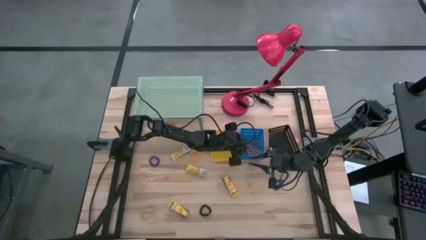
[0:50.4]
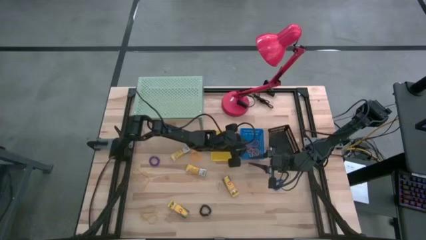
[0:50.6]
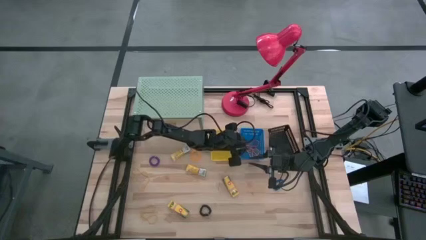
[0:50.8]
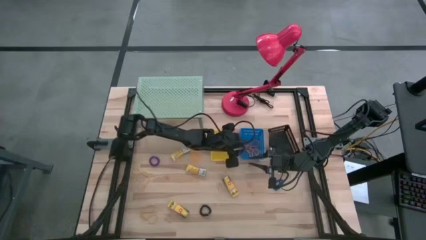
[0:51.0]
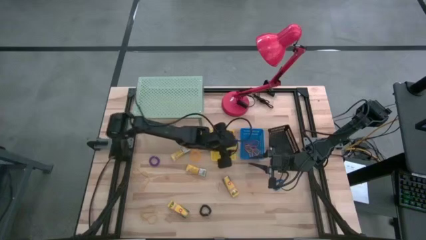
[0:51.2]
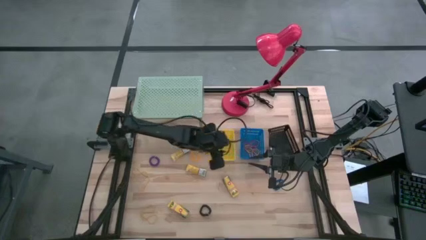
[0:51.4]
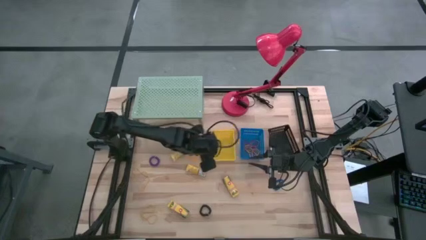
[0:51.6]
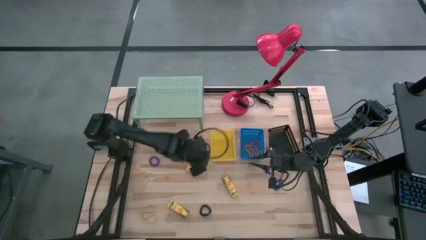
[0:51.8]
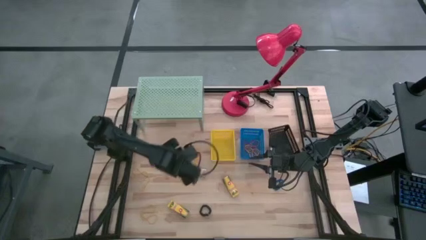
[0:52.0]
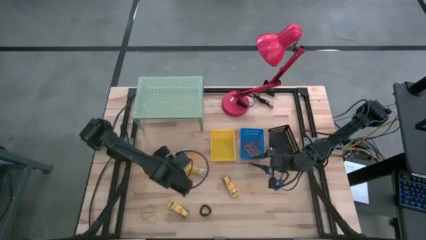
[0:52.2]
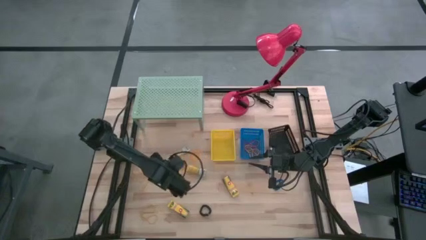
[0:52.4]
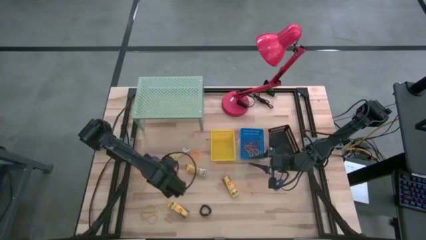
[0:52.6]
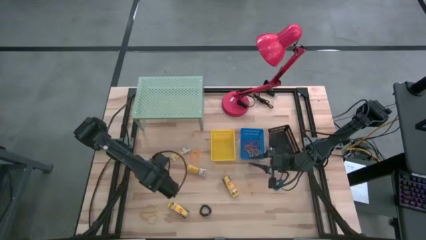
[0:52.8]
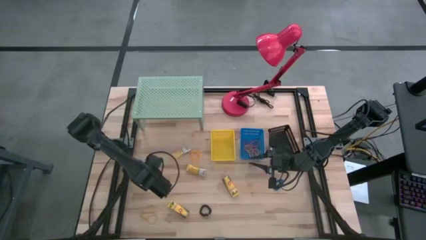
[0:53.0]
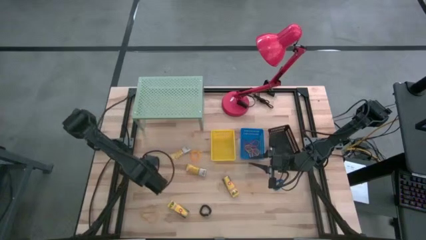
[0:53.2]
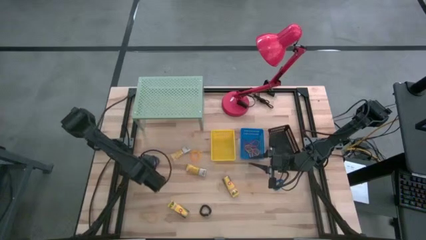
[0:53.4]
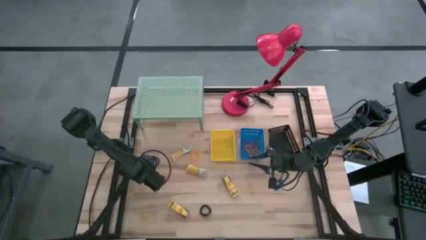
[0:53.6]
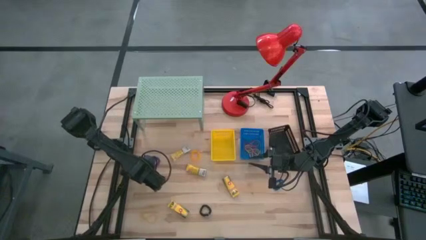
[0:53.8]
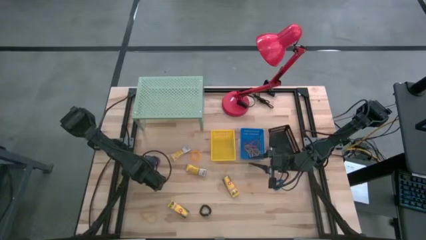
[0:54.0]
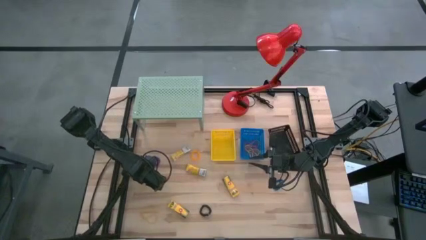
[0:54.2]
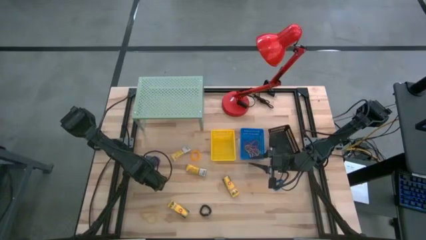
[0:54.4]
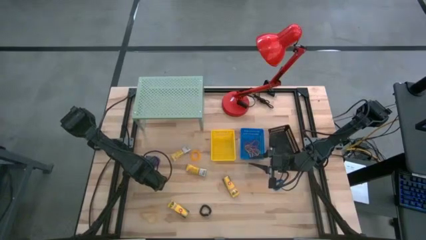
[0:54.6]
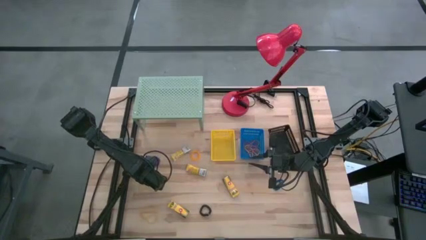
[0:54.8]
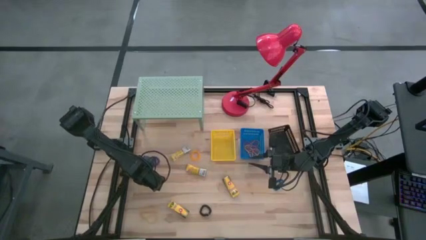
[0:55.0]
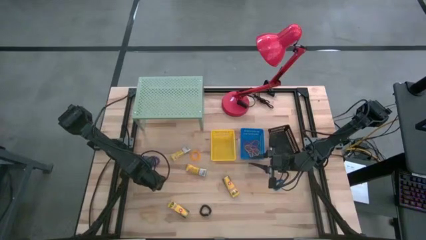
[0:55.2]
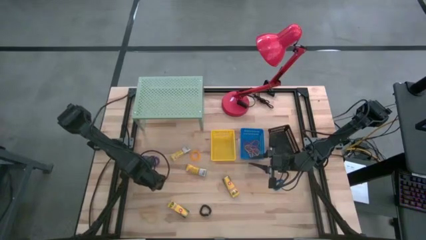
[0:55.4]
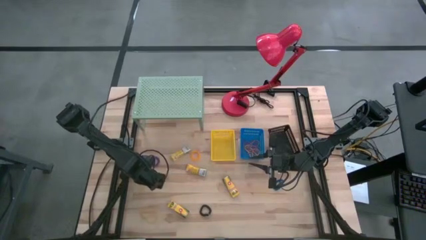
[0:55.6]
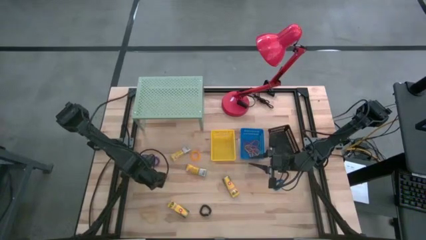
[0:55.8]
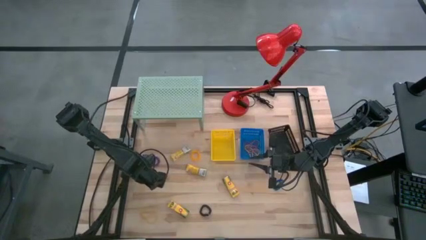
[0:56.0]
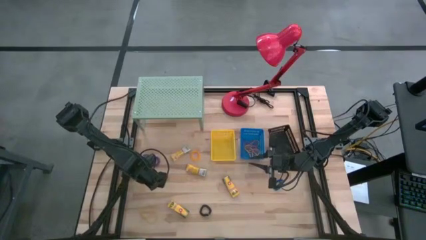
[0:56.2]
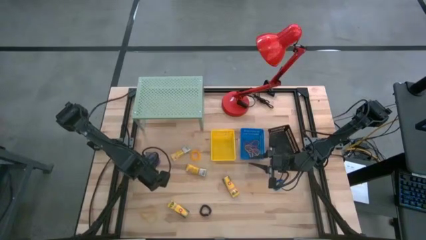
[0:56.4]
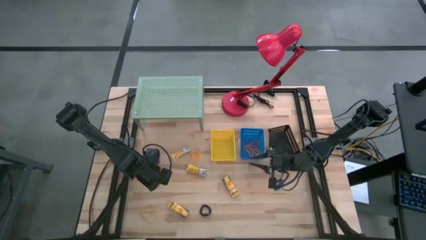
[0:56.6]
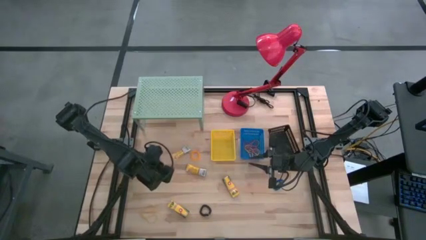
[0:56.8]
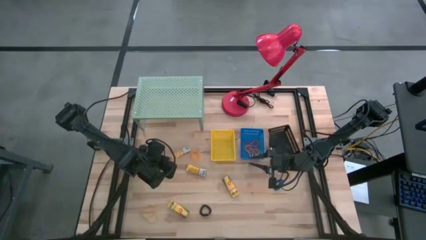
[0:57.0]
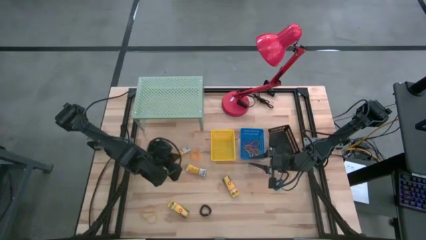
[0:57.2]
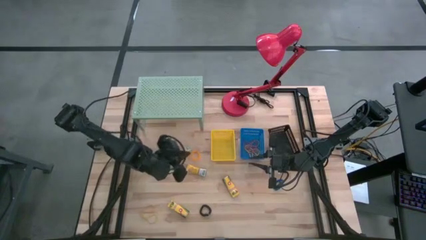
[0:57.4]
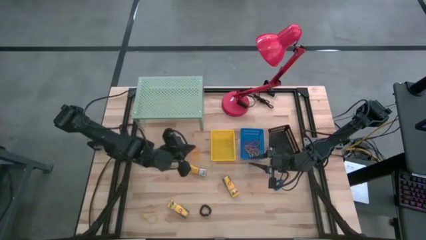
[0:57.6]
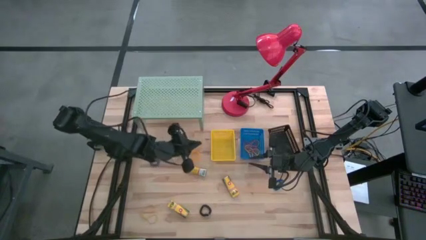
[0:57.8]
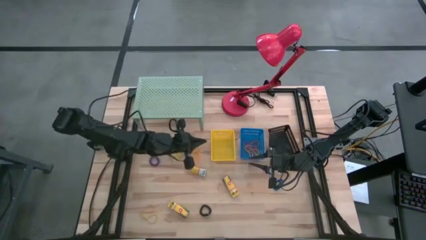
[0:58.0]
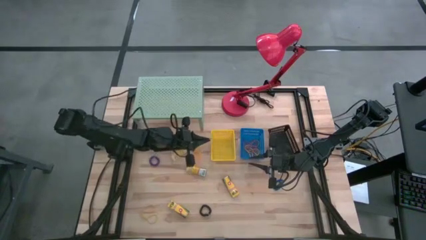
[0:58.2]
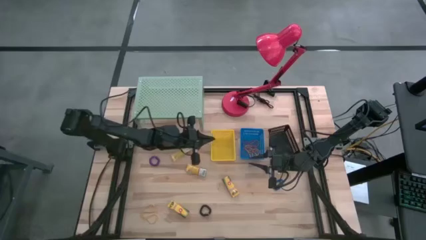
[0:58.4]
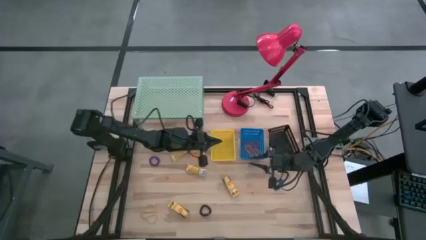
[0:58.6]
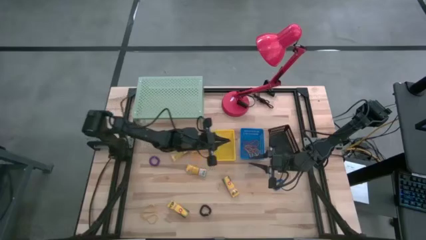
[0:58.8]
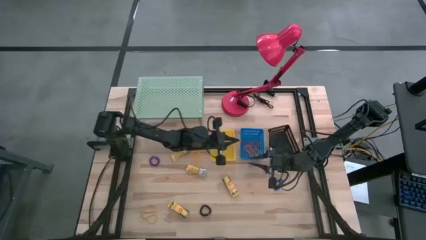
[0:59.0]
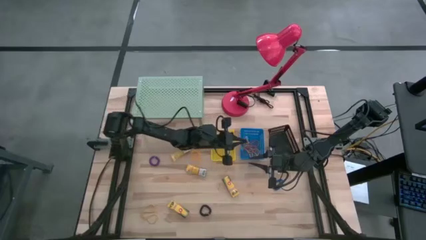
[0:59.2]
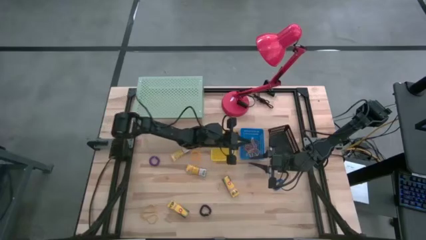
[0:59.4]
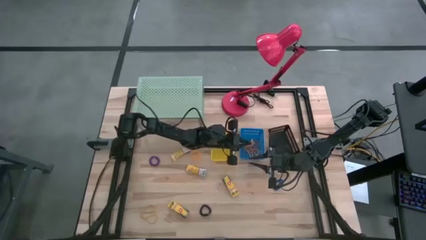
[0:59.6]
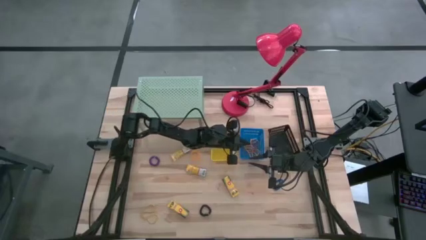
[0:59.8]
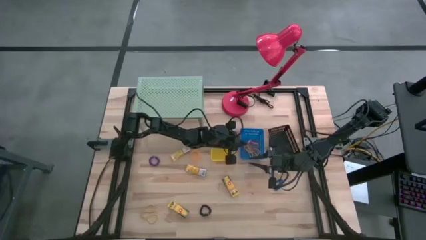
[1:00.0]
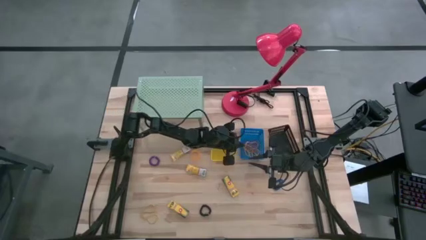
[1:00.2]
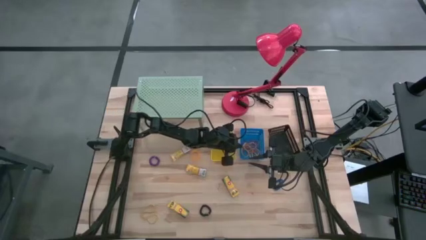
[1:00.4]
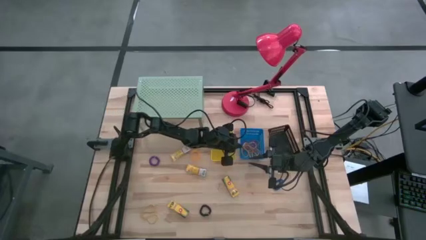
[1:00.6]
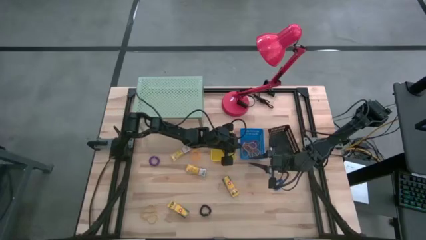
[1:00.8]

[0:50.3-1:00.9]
Task: Pick & Place Office Desk Supplies
Put the top yellow rubber band into the blue basket

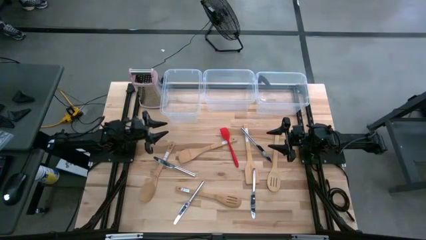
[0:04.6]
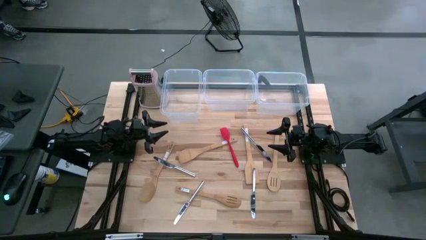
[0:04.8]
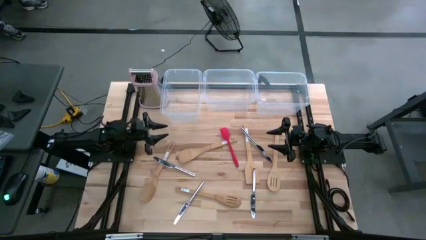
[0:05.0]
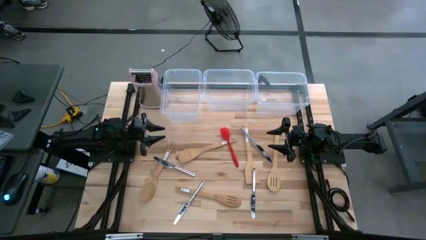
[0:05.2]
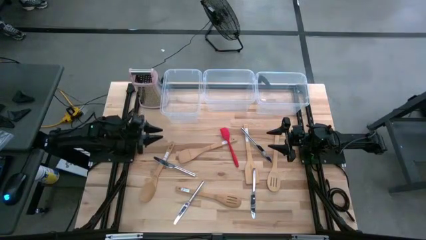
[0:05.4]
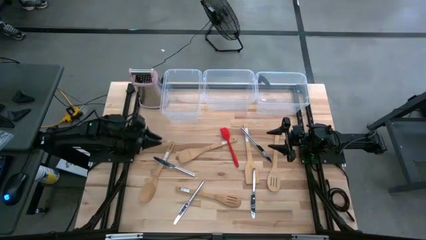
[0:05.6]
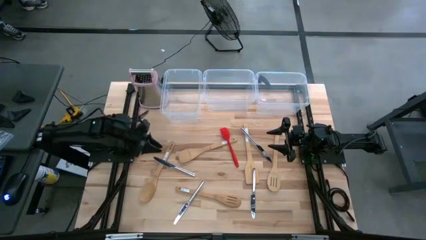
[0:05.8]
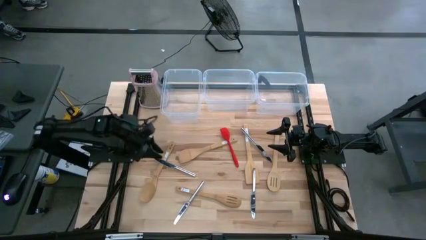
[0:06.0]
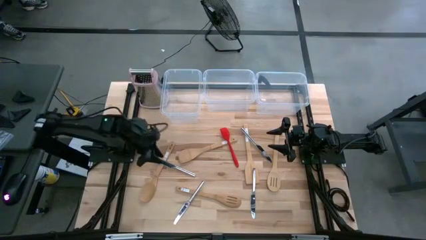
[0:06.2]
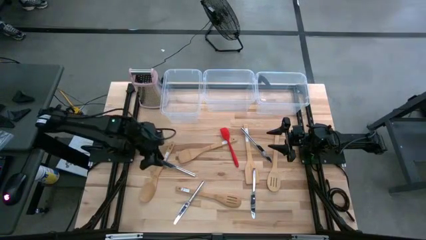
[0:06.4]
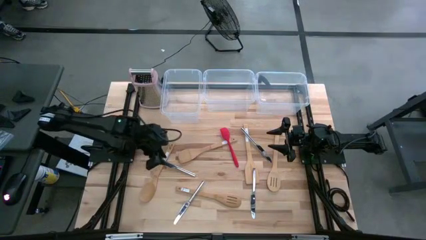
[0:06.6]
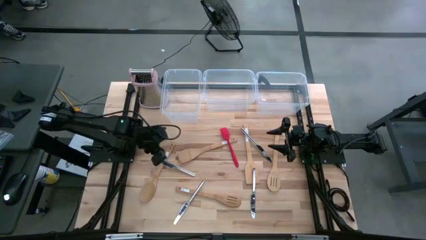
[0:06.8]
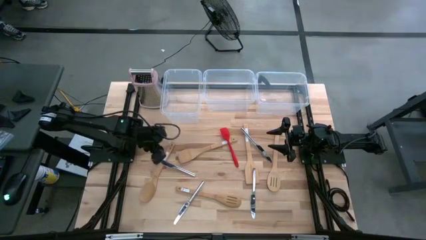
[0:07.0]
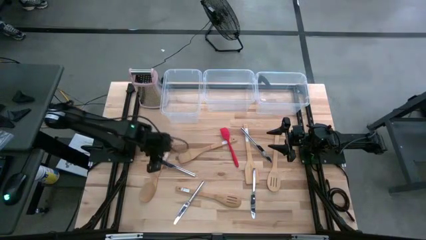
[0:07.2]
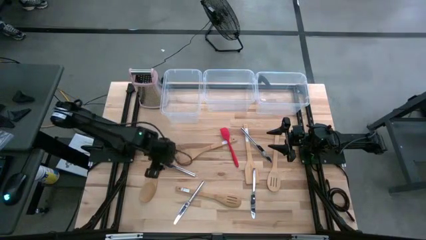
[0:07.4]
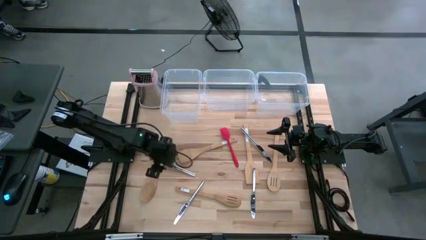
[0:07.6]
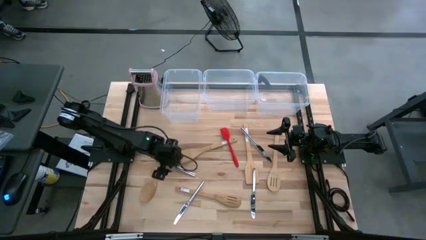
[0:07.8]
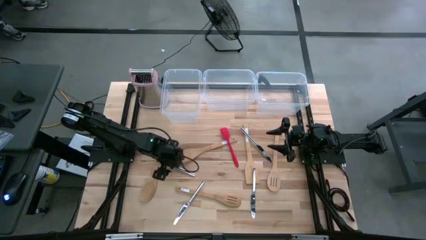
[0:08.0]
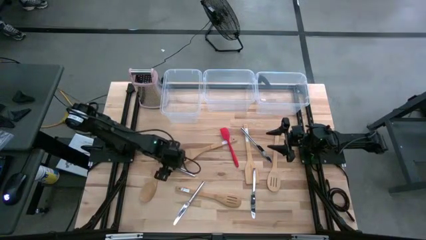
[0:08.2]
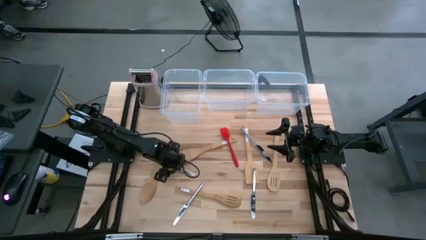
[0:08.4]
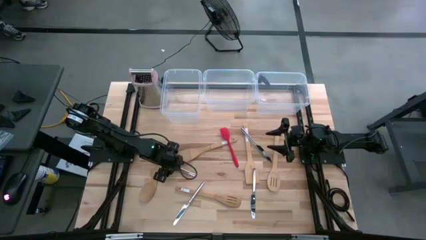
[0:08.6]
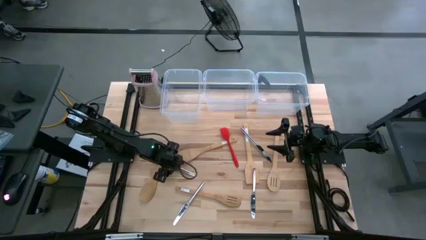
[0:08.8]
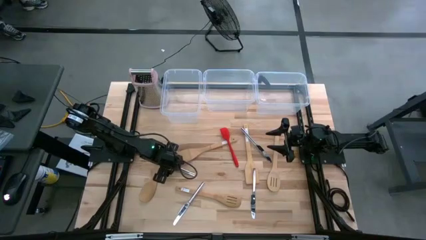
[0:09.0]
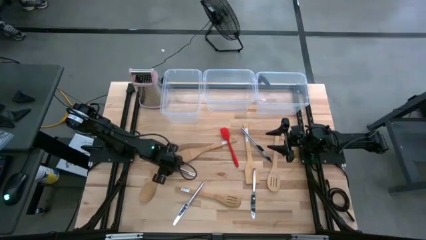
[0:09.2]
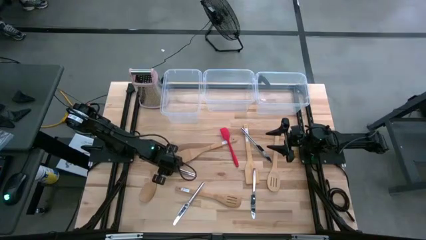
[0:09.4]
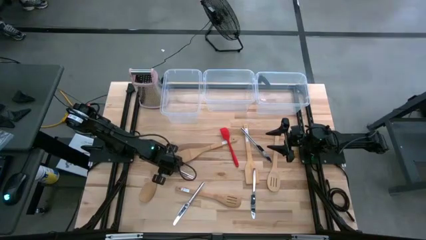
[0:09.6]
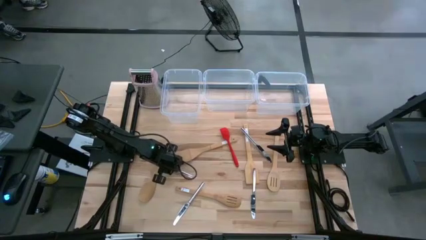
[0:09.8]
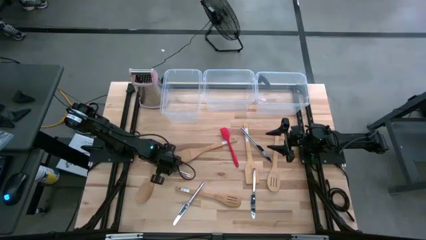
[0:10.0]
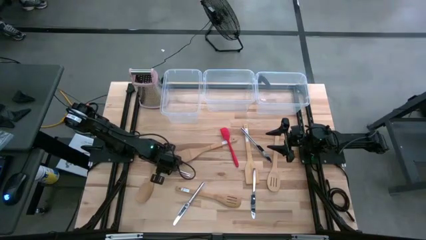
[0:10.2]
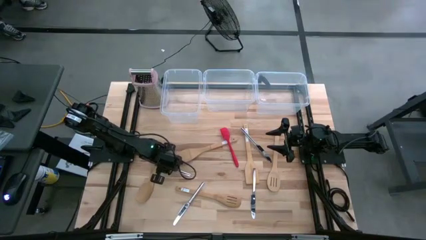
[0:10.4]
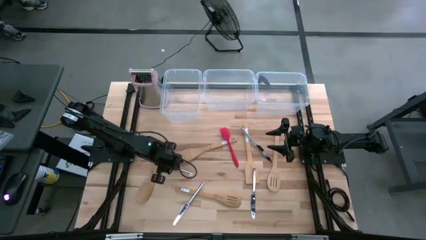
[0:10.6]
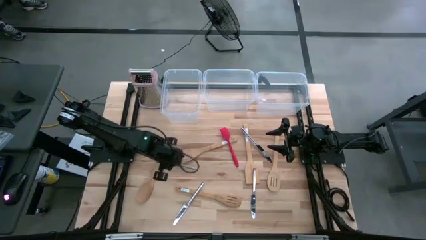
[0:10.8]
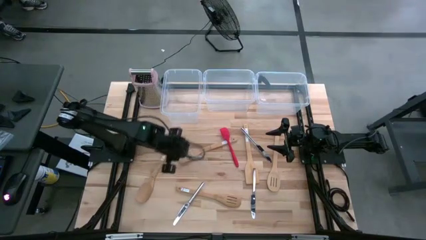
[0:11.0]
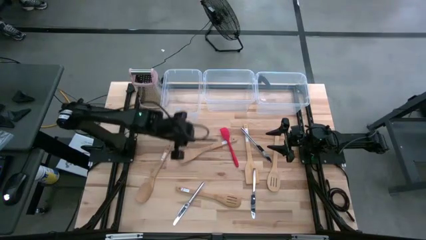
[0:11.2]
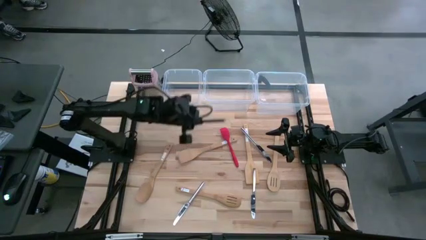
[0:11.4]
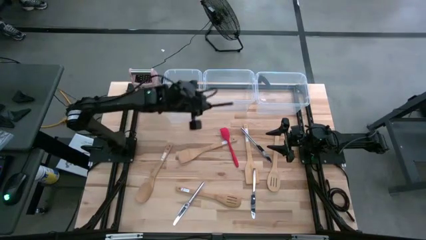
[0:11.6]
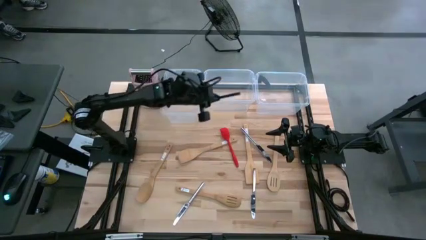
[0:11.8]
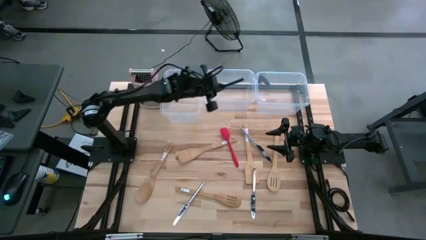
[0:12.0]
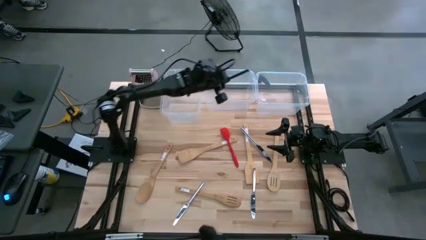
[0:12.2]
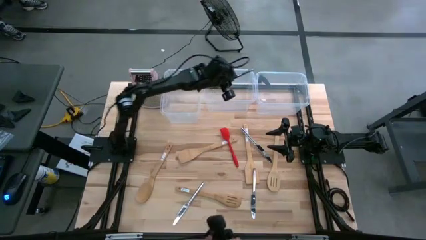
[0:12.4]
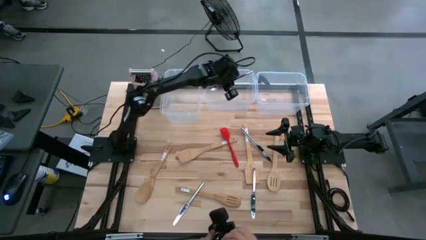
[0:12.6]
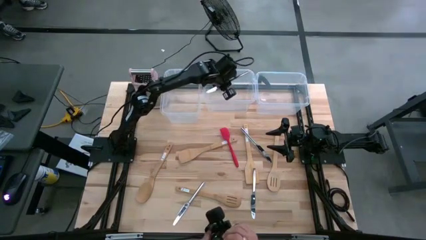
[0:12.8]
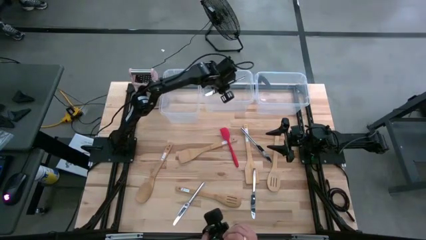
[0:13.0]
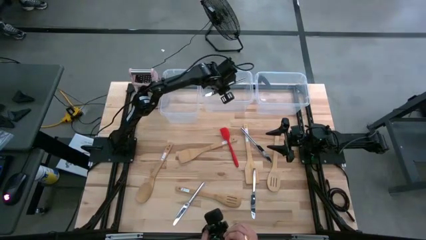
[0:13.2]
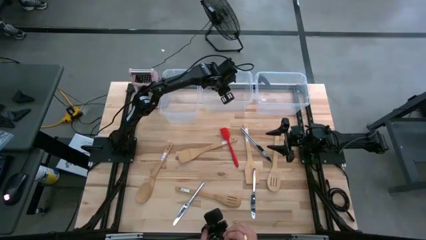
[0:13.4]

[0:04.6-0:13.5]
Task: Pick & Place Kitchen Items
Put the silver table knife into the middle transparent container
